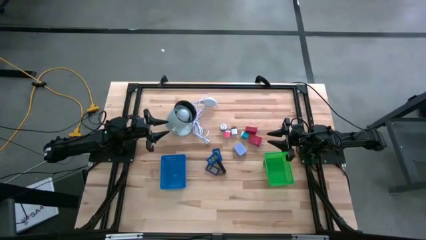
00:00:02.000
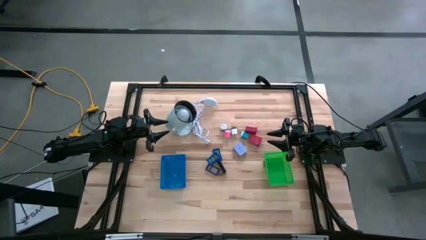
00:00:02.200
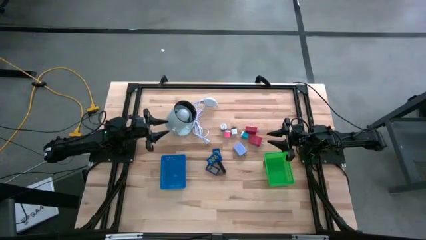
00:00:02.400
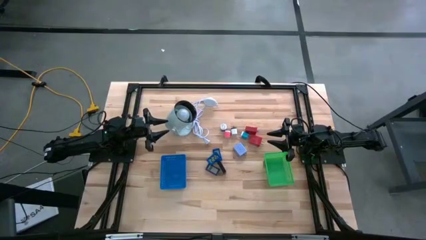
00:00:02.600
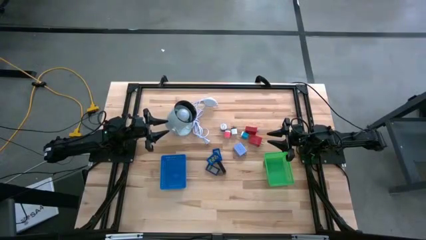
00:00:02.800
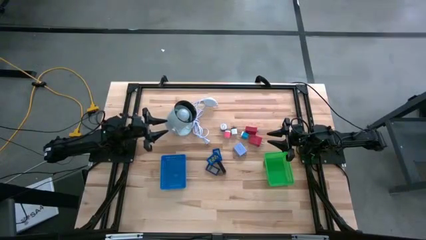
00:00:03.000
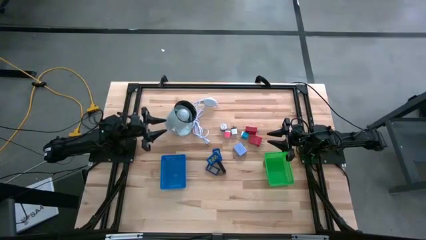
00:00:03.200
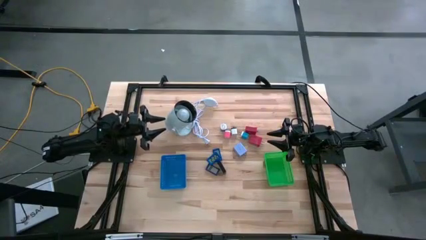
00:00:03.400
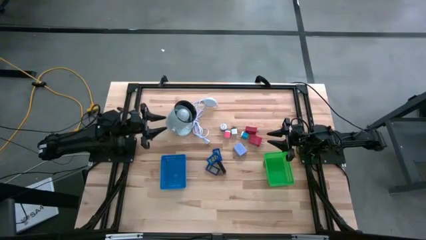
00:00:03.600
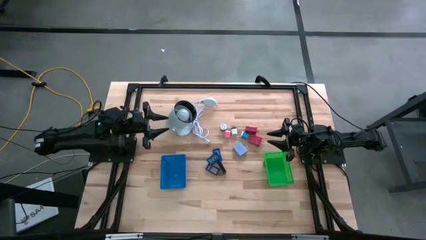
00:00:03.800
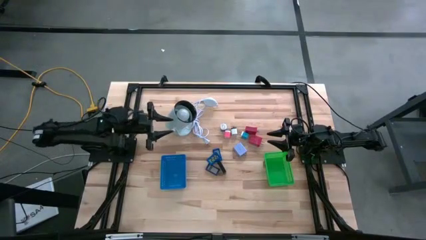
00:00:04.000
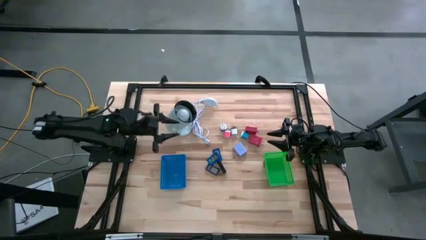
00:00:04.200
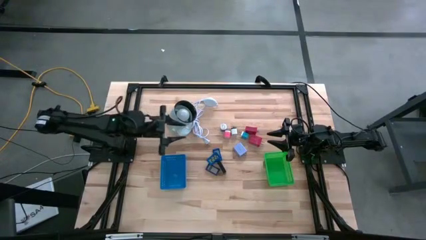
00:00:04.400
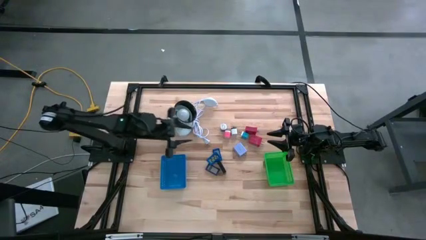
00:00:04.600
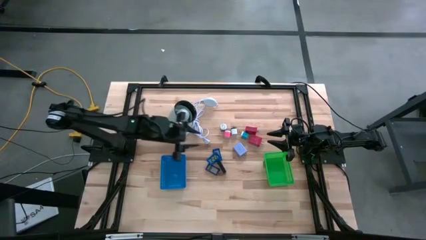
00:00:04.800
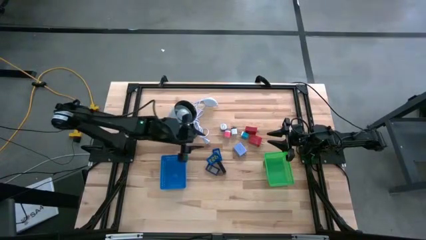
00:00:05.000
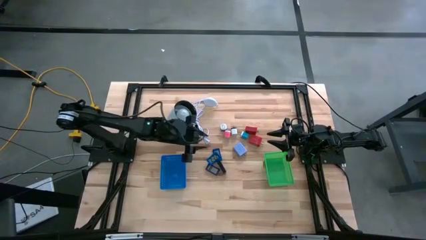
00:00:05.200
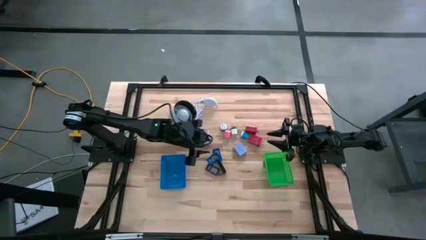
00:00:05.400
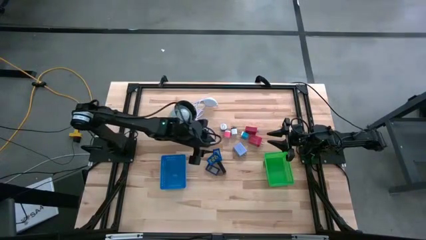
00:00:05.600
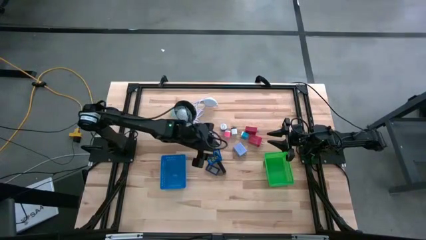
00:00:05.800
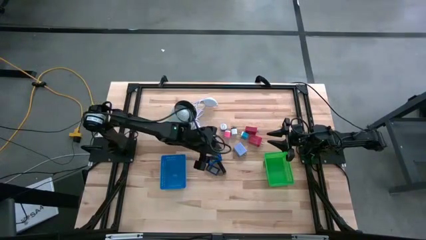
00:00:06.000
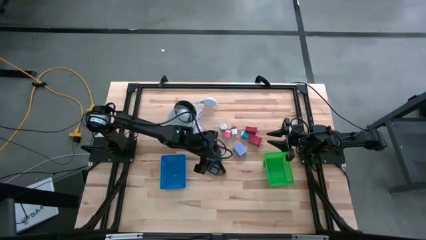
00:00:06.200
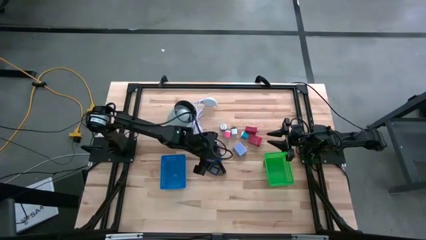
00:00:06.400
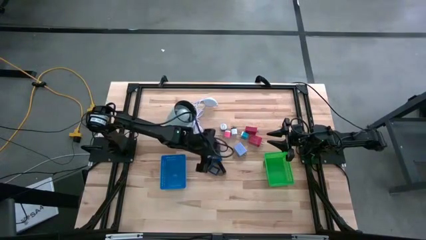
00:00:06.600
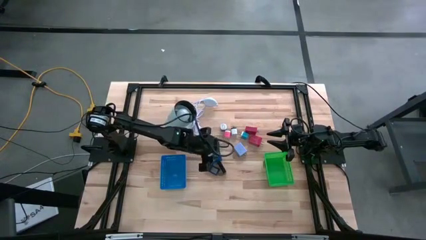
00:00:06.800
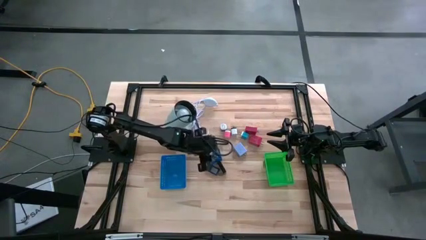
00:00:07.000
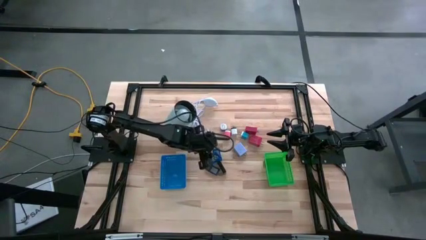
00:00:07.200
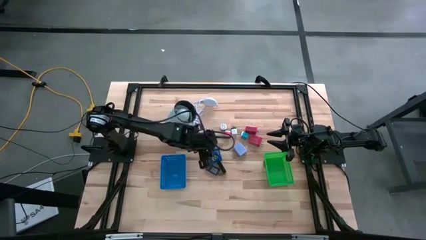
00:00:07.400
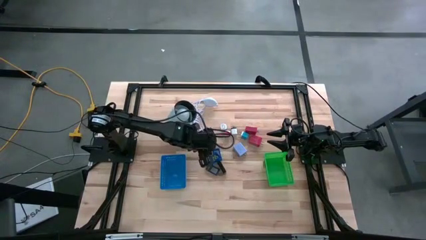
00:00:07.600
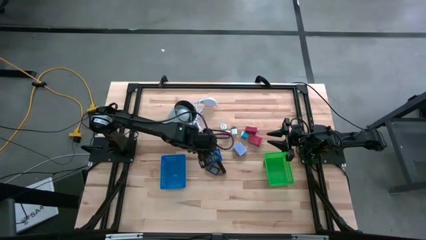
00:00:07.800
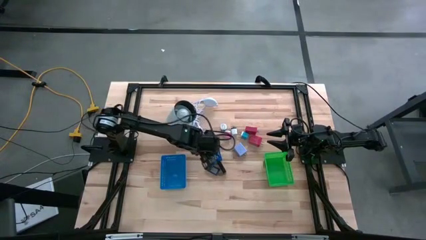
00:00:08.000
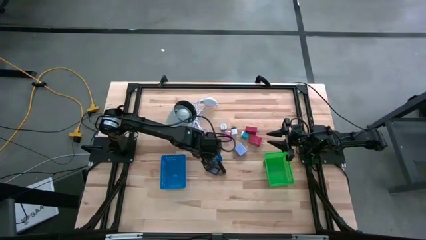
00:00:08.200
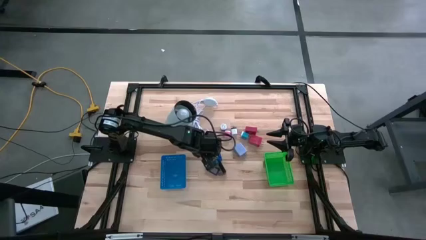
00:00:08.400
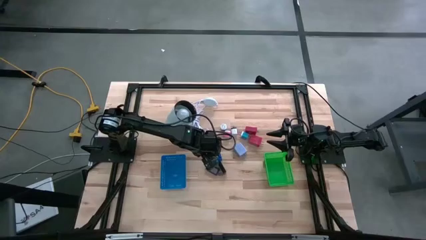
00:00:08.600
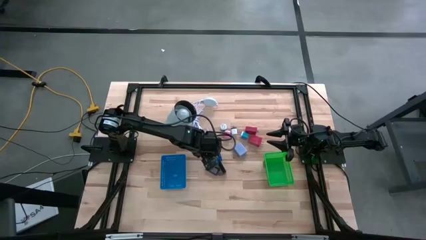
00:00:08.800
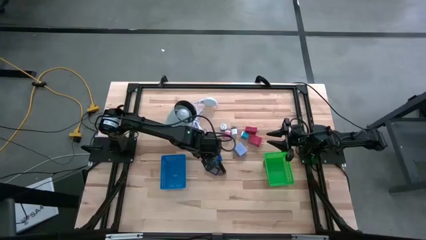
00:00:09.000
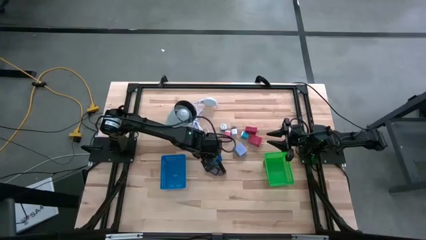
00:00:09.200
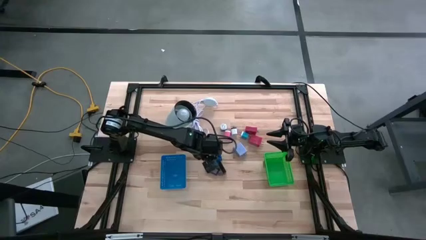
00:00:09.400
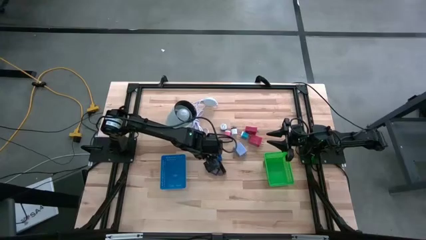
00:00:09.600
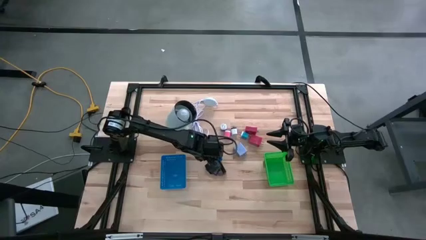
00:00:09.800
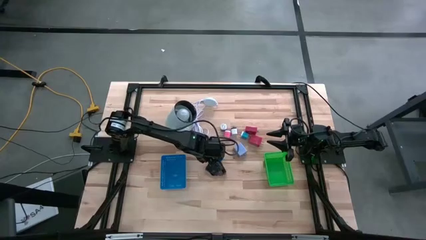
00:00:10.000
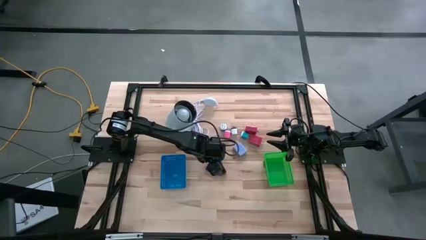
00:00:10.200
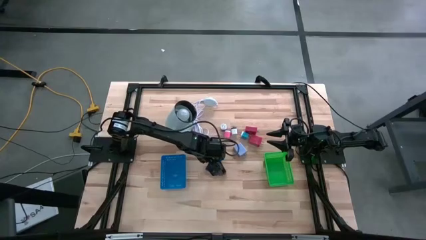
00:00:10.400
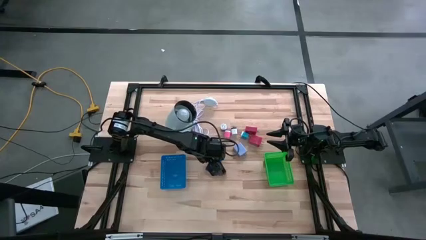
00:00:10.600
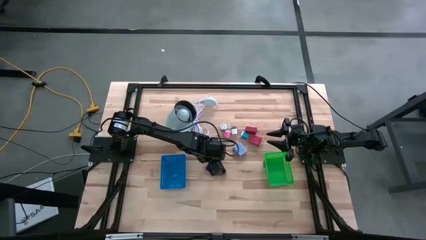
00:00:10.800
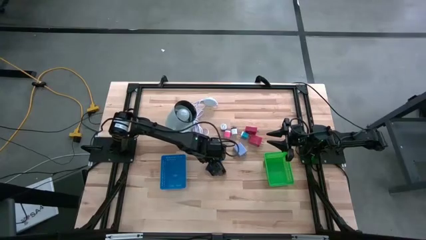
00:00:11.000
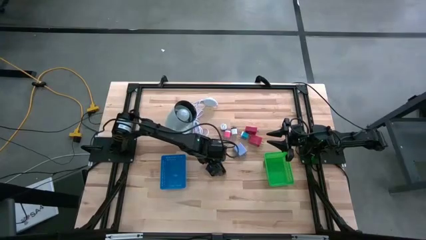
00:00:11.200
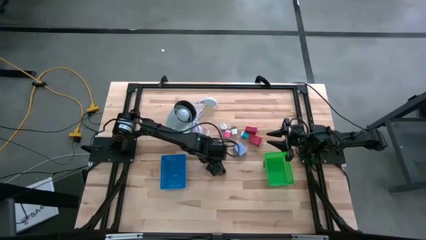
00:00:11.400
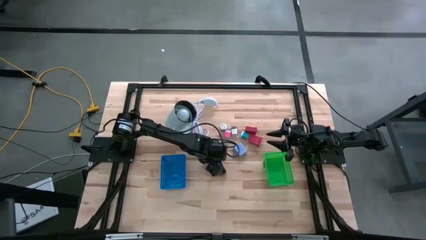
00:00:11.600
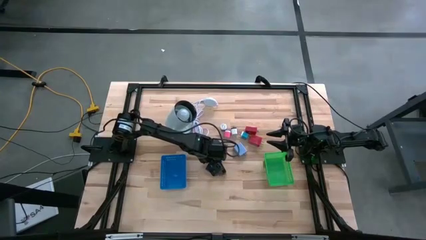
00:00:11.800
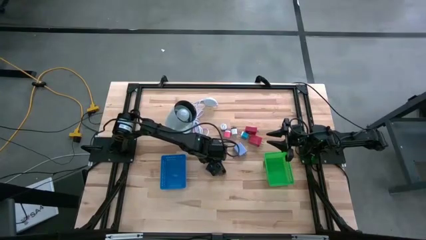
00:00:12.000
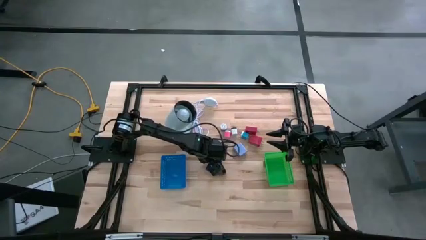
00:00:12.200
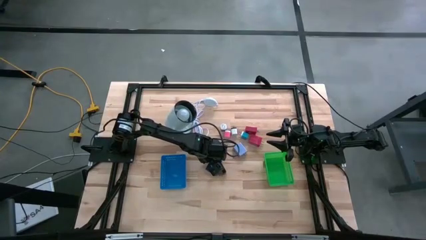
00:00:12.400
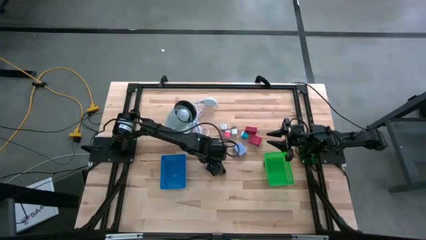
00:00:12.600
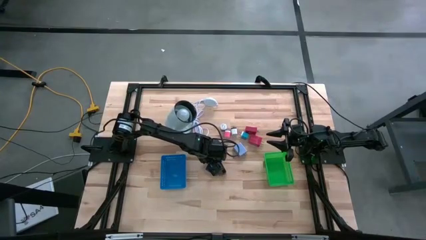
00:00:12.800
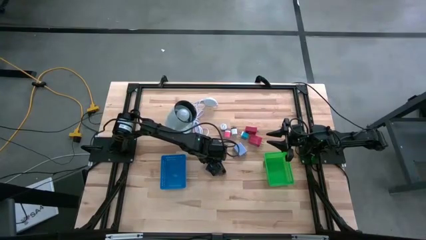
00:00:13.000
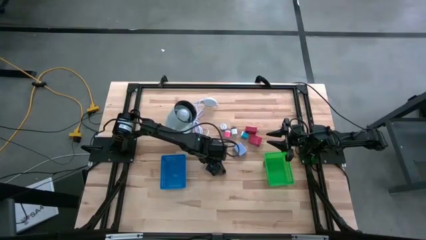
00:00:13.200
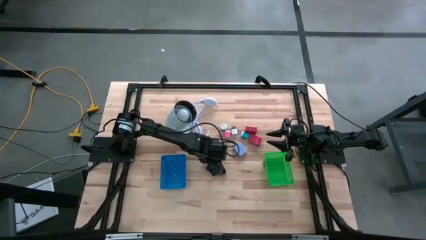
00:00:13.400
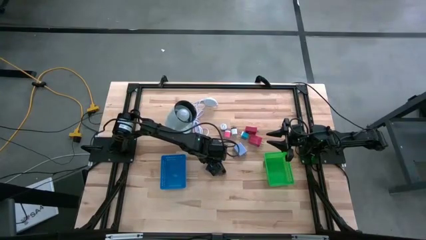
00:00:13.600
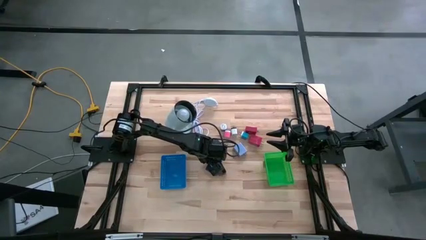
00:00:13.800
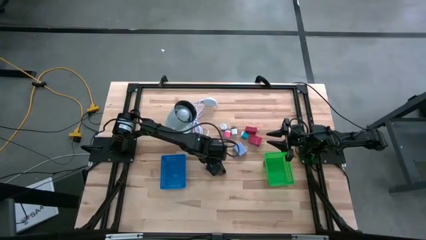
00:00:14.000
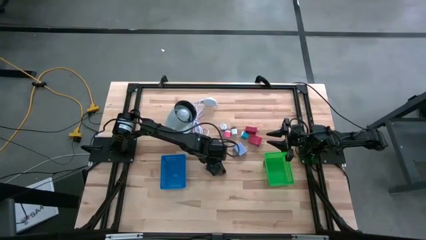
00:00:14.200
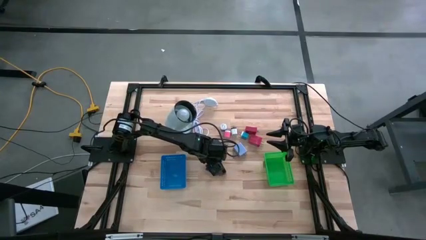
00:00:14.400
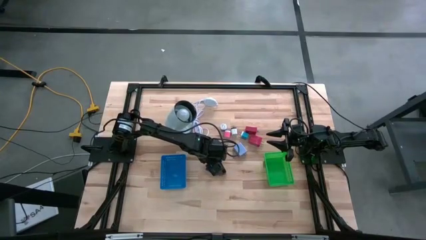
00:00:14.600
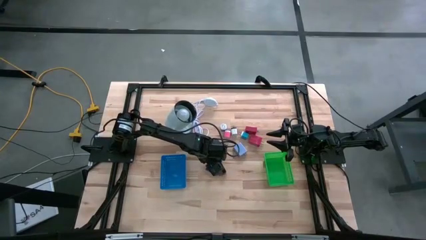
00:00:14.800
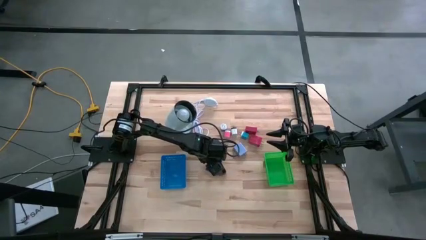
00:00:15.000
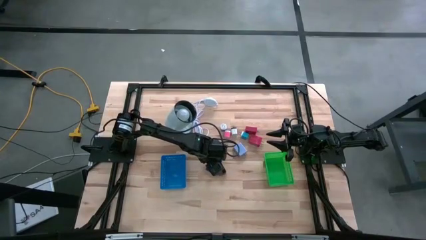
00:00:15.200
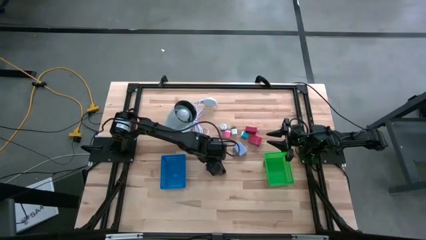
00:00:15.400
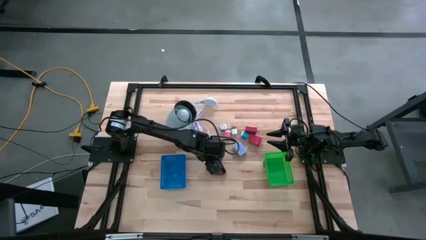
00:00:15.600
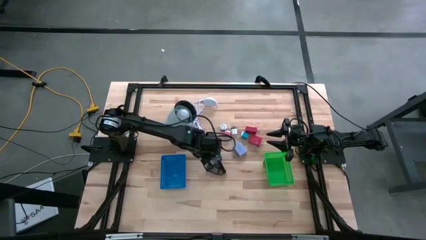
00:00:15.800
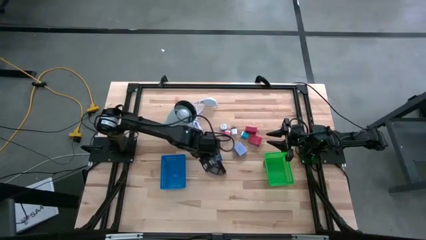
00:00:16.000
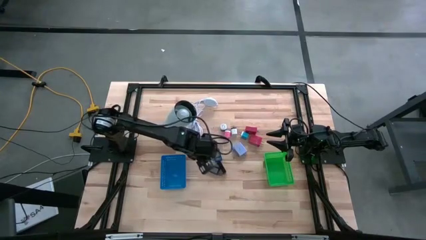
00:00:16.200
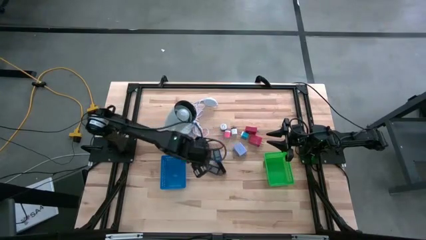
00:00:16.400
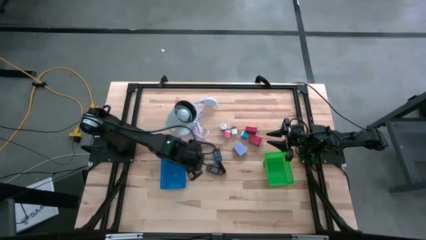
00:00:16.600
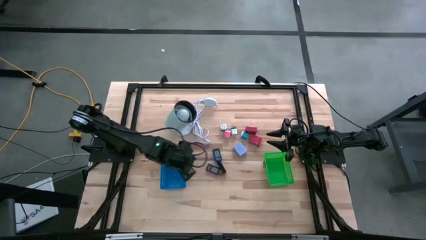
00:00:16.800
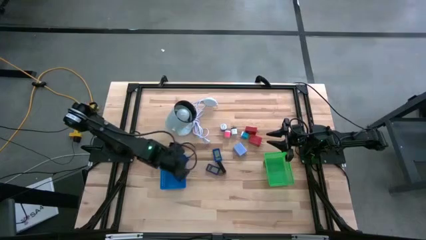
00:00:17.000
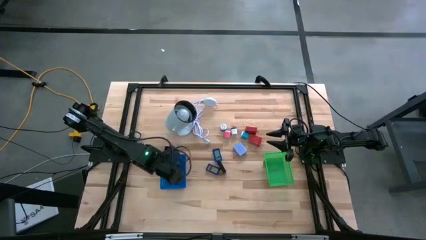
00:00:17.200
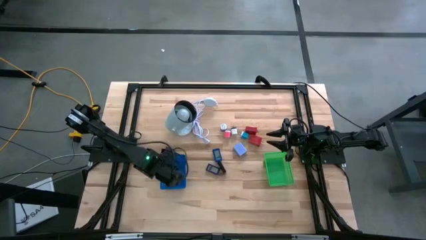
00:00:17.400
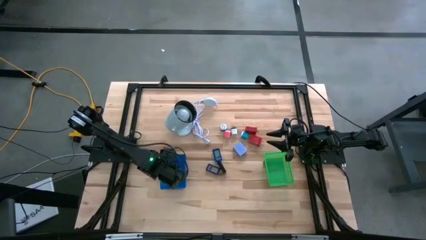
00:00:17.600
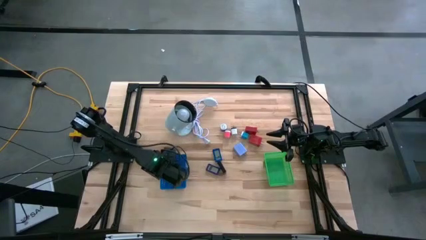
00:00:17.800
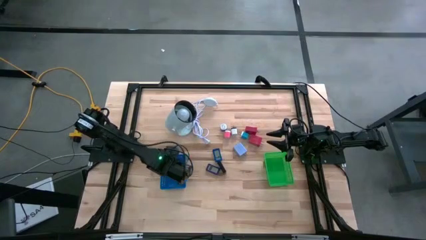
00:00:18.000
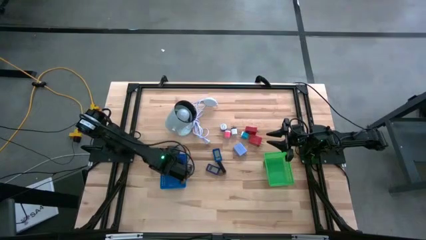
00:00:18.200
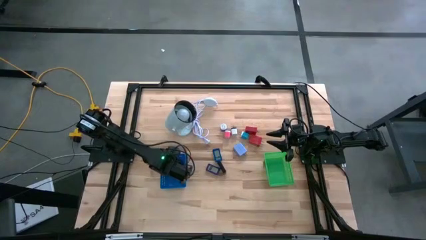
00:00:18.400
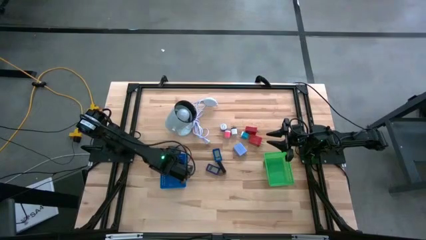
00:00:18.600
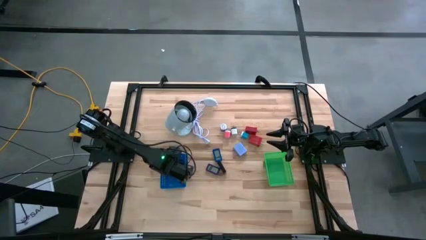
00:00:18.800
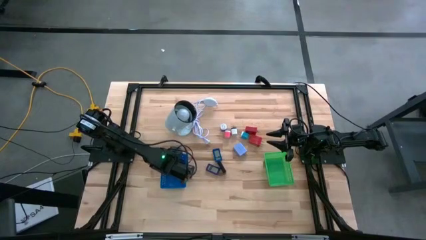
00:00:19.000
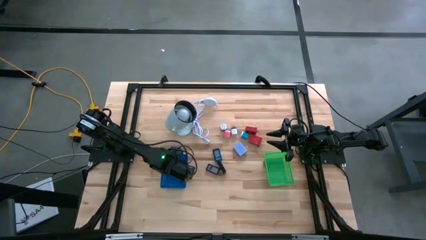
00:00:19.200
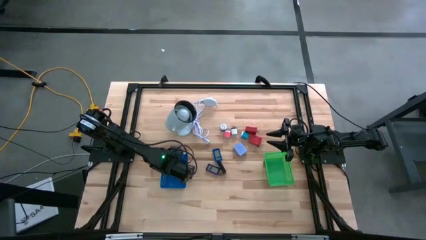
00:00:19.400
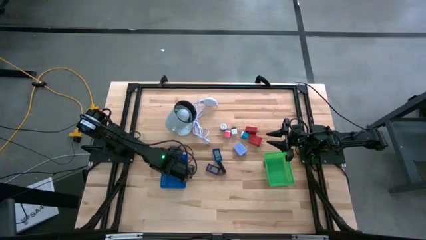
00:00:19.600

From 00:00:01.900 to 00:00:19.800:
Task: Pick & Place Office items
Put the blue digital timer into the blue bin
